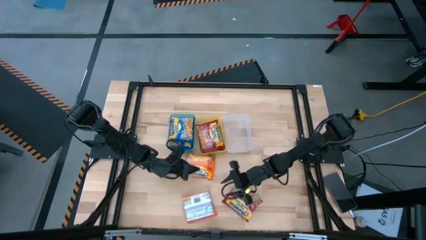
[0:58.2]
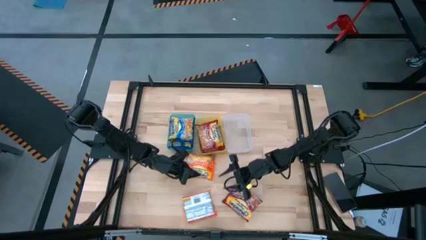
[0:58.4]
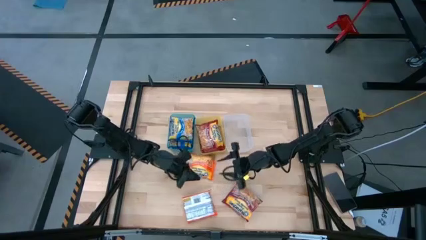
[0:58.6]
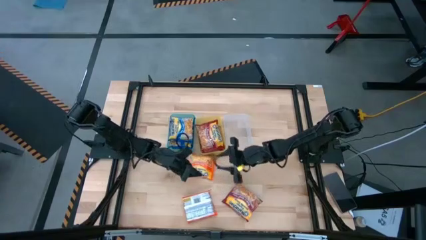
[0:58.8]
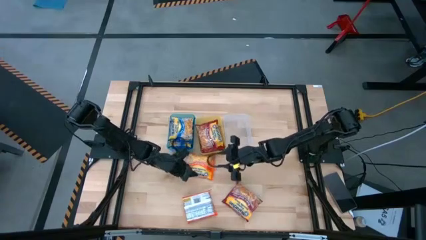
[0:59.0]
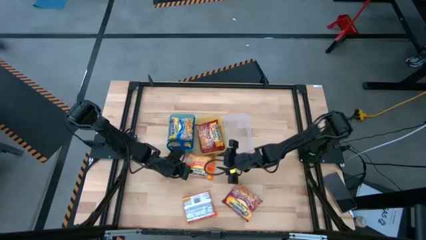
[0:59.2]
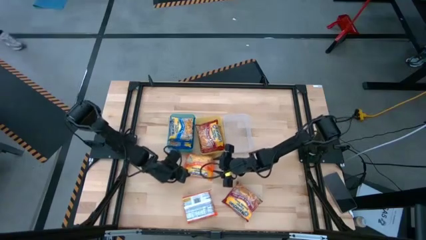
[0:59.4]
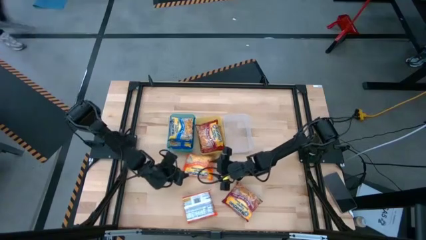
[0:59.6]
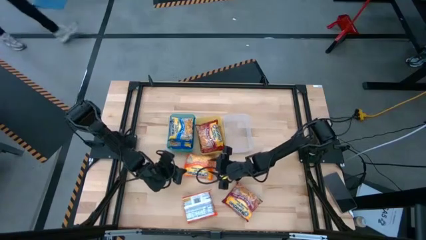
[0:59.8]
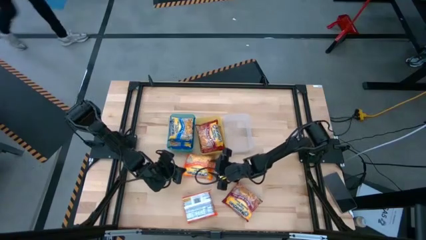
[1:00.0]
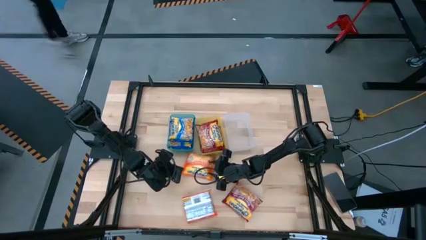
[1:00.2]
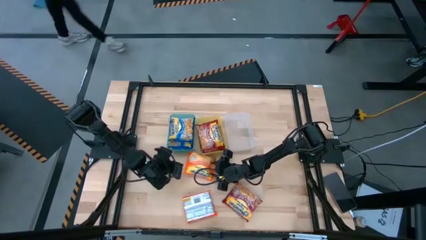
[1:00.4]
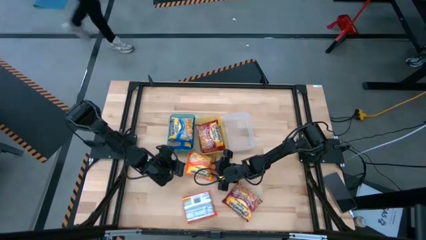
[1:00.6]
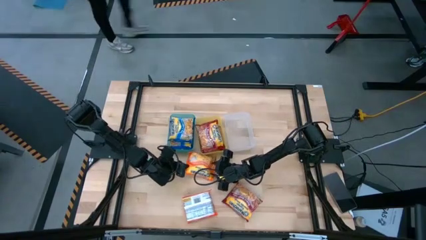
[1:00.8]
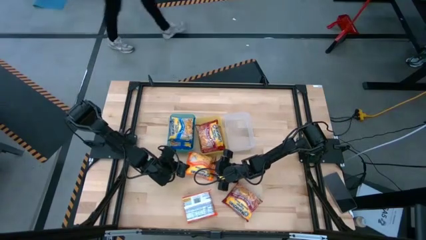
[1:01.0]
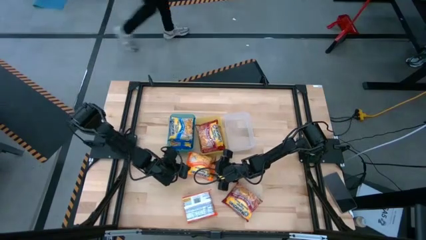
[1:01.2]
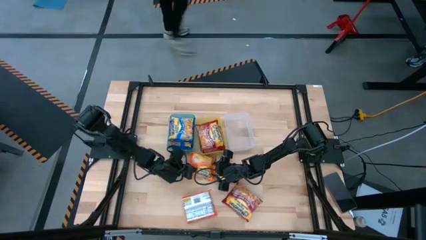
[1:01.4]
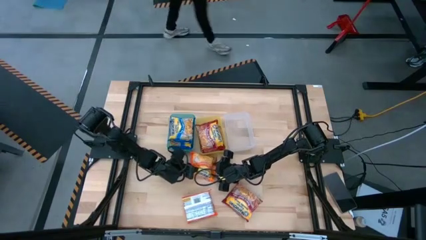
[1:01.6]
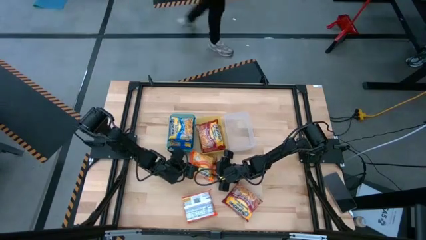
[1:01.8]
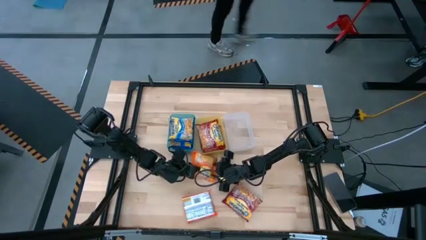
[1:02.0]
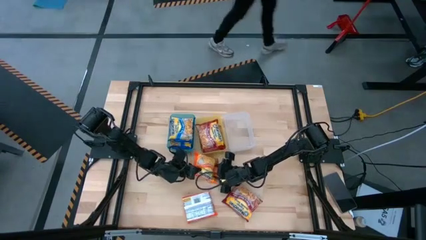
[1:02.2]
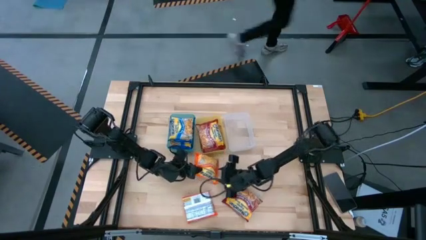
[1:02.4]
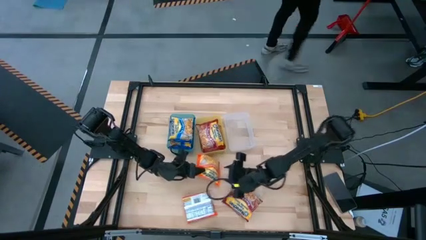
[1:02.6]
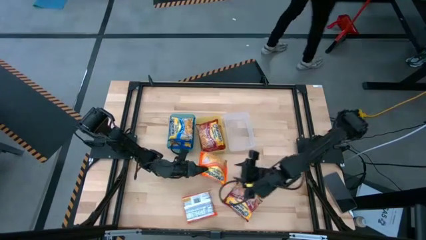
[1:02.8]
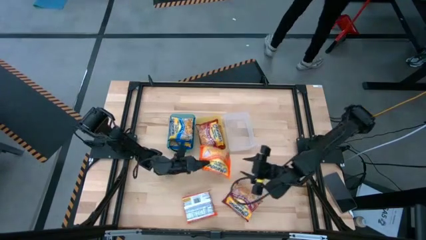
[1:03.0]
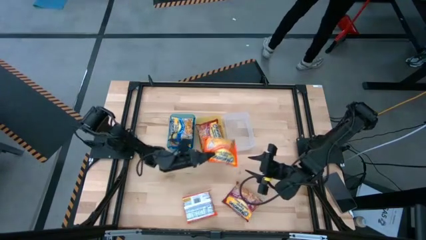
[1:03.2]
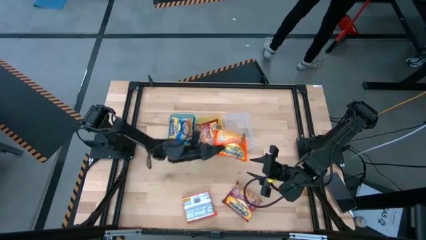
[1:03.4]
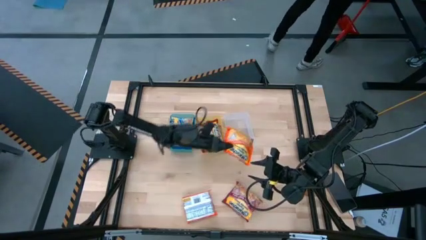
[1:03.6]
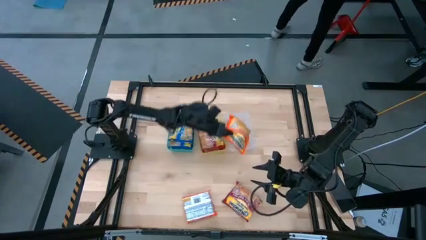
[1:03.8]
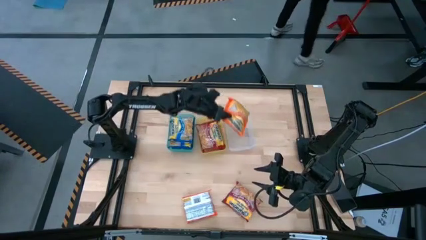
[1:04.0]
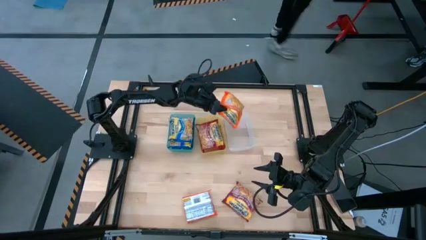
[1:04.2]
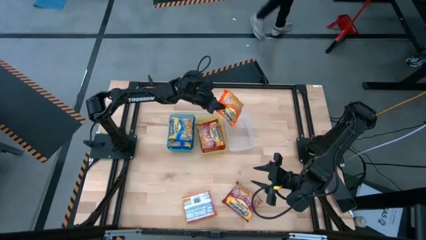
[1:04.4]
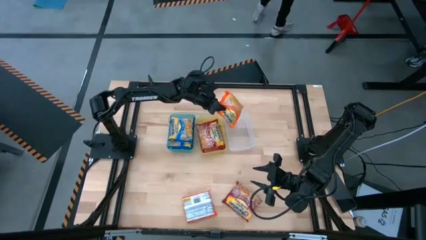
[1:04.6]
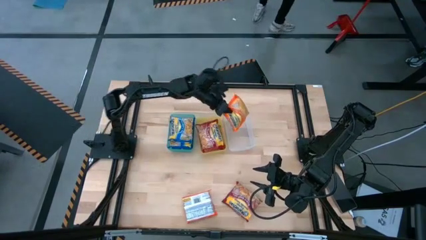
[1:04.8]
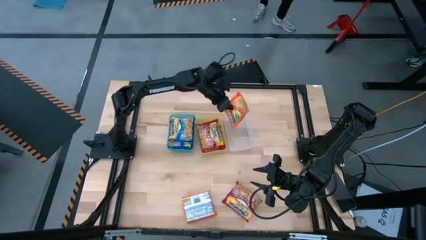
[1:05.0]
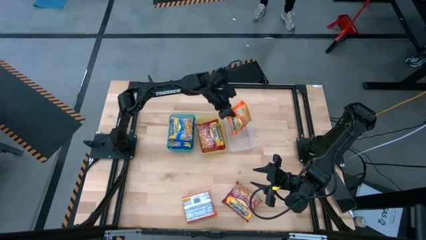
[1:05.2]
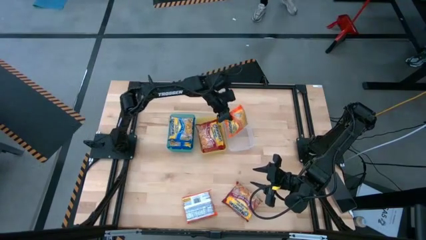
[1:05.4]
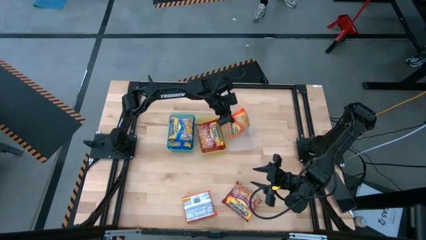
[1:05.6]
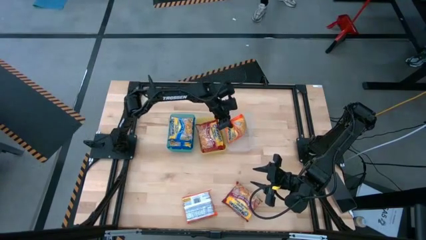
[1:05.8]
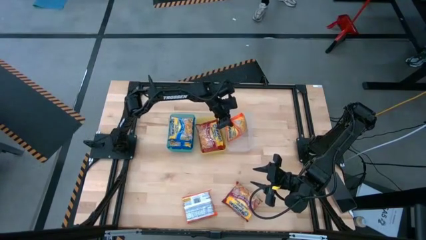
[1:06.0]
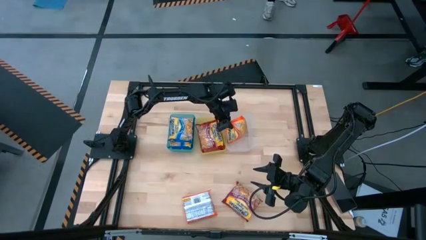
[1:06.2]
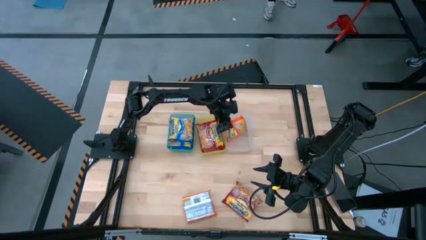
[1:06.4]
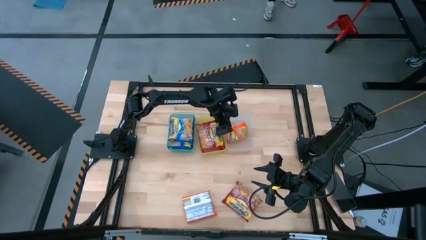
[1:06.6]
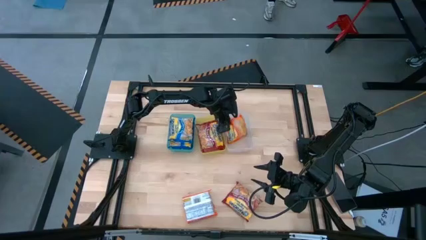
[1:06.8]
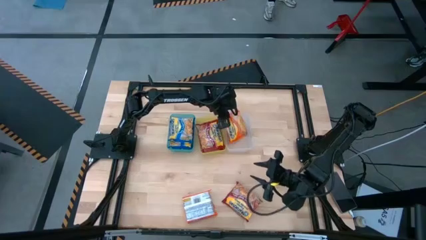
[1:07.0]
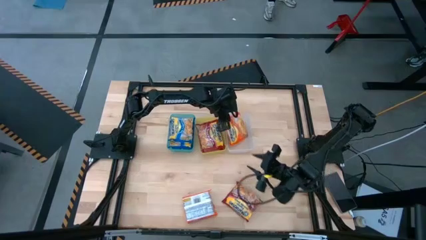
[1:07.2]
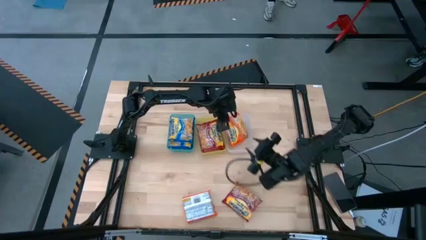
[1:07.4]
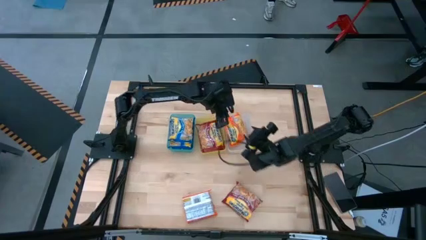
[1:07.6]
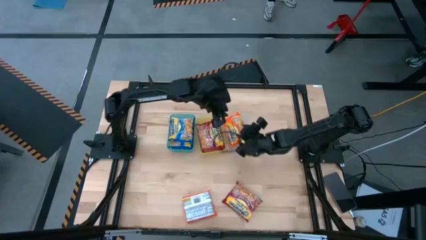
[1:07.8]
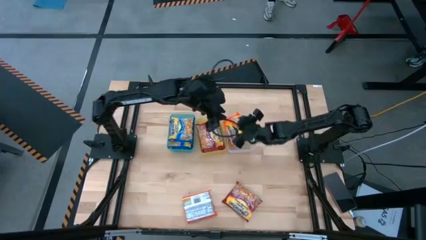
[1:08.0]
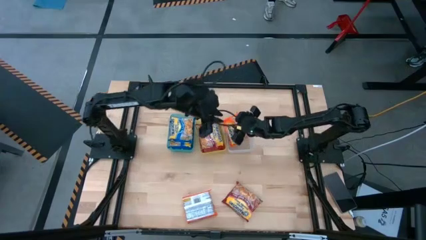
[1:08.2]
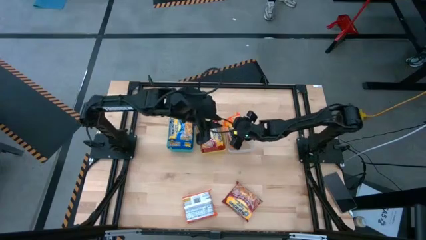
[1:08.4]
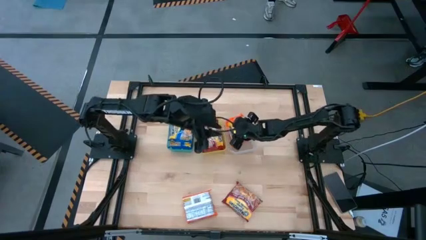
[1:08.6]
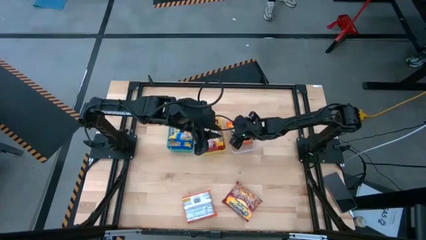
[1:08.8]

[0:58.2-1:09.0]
Task: Sort Maruchan noodles
Put the orange bag into the white bin
